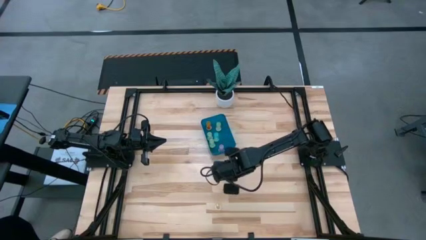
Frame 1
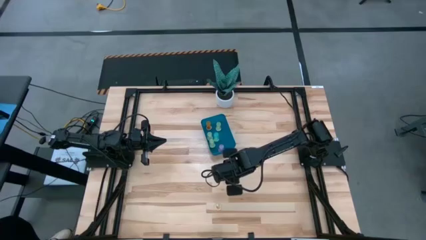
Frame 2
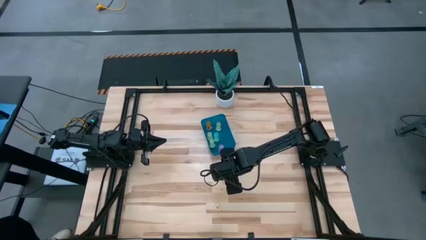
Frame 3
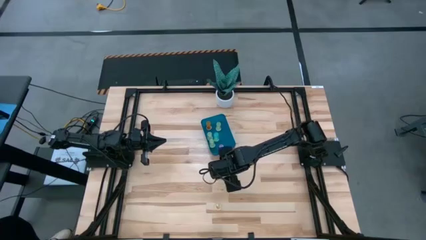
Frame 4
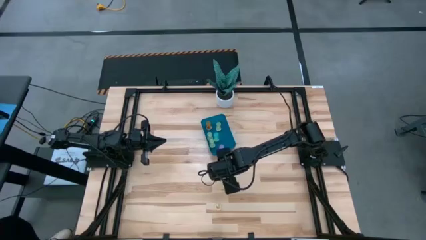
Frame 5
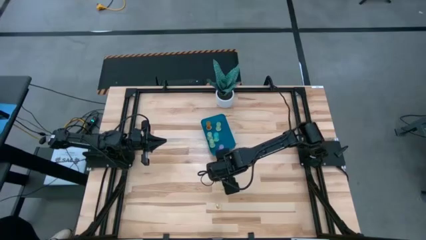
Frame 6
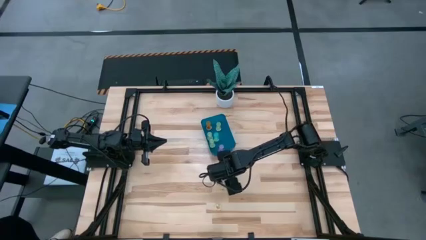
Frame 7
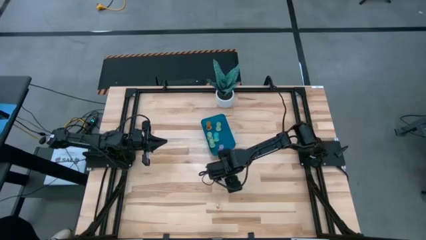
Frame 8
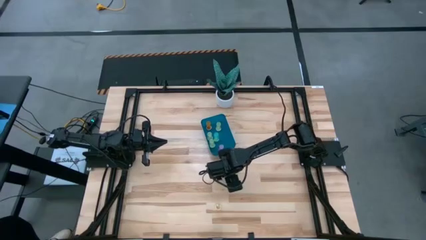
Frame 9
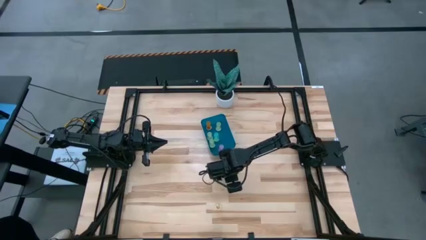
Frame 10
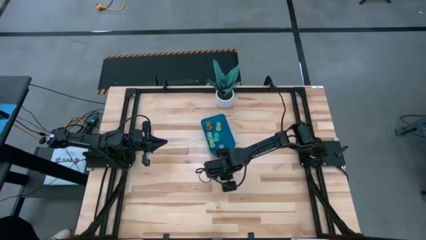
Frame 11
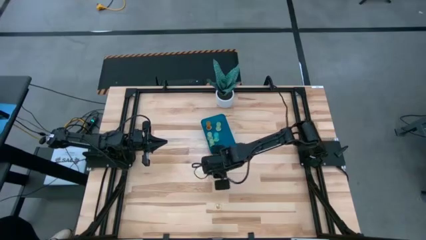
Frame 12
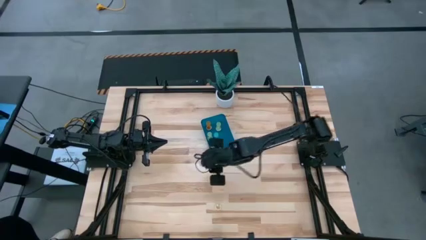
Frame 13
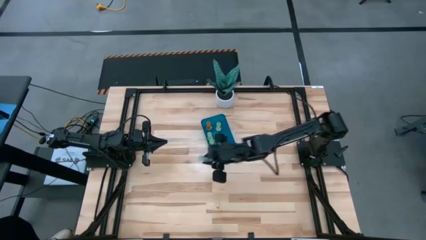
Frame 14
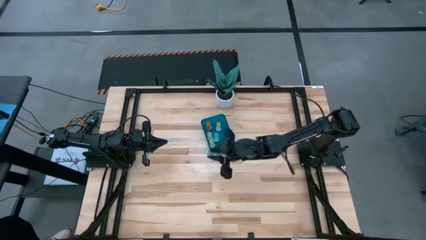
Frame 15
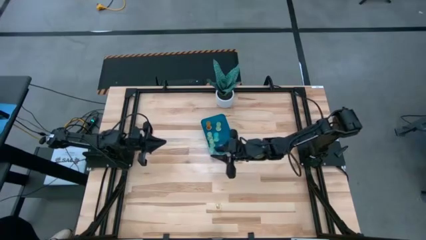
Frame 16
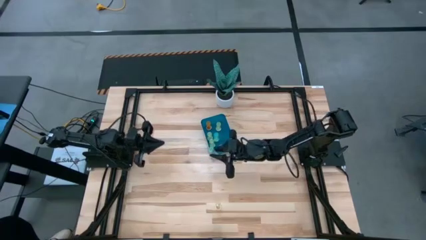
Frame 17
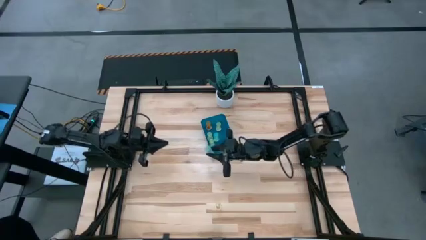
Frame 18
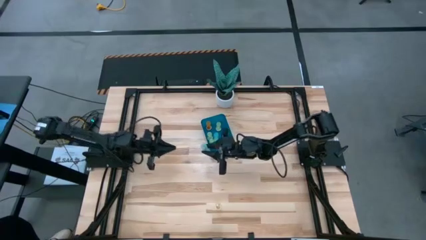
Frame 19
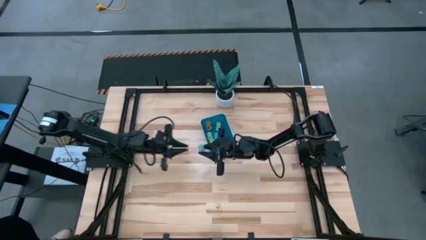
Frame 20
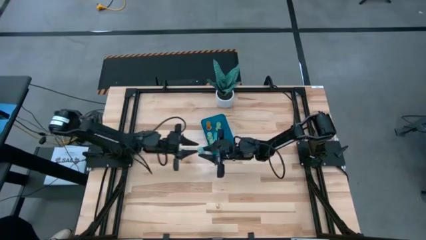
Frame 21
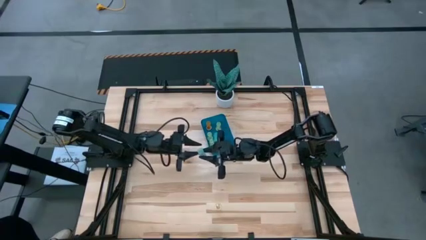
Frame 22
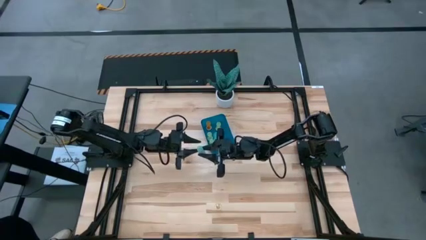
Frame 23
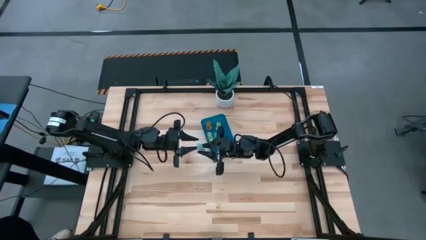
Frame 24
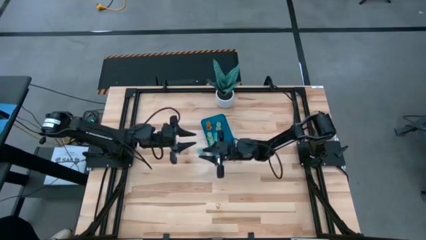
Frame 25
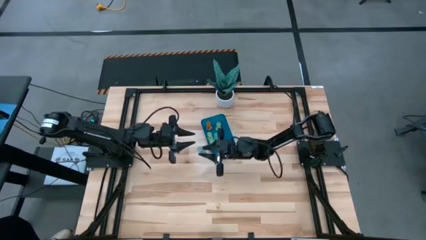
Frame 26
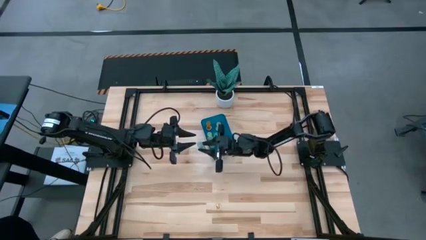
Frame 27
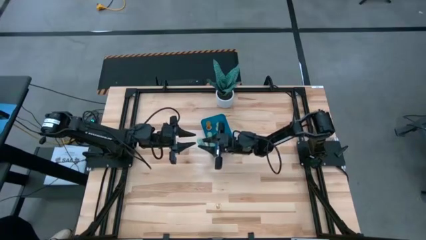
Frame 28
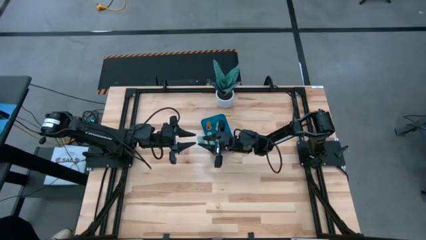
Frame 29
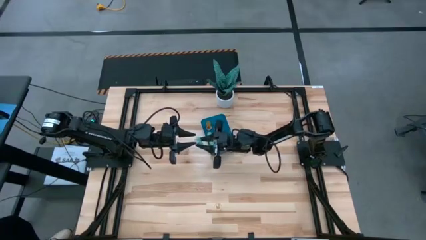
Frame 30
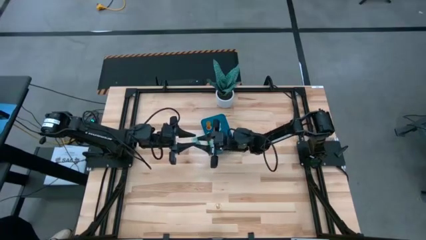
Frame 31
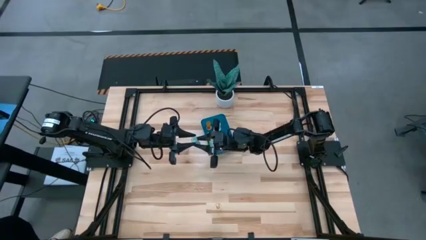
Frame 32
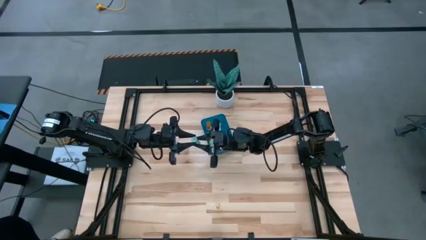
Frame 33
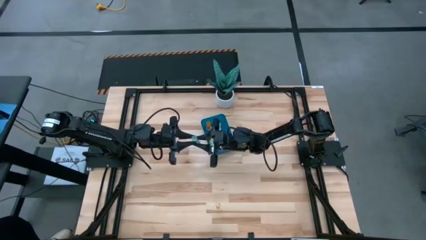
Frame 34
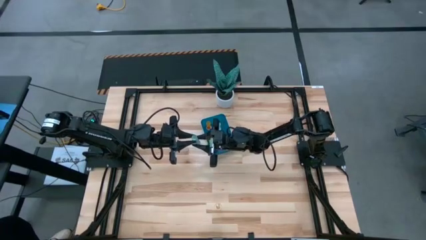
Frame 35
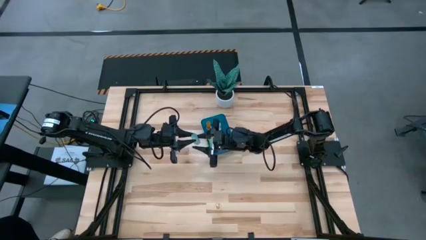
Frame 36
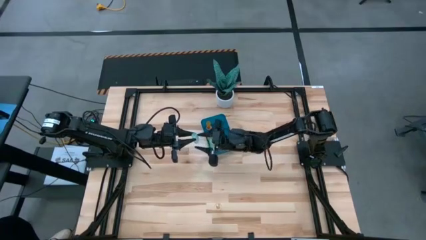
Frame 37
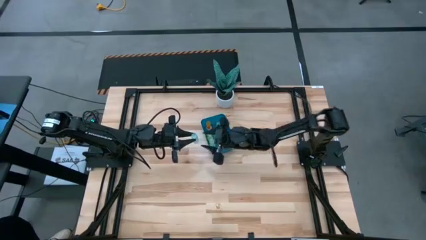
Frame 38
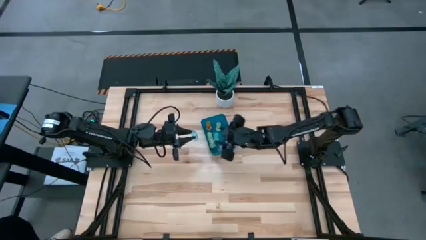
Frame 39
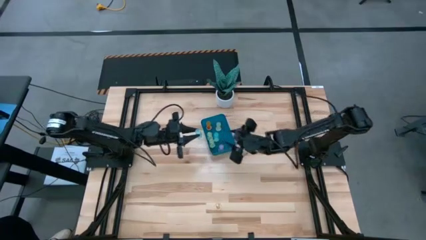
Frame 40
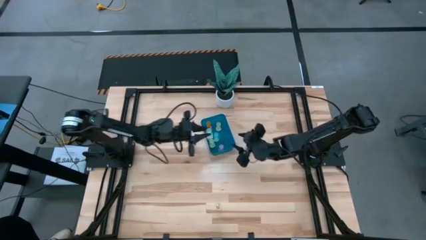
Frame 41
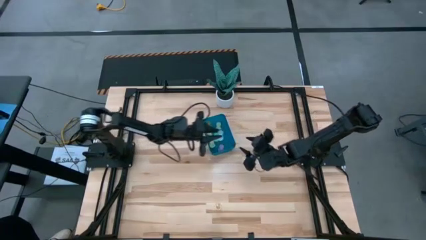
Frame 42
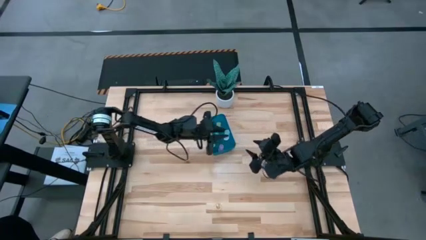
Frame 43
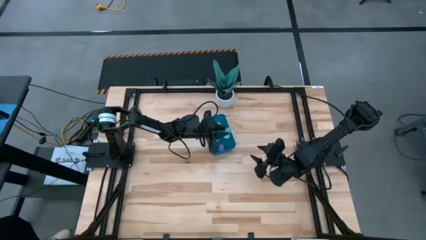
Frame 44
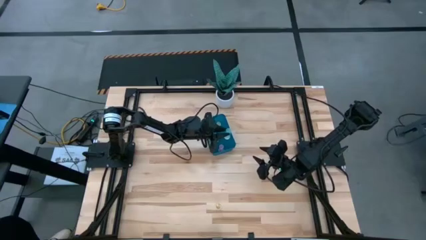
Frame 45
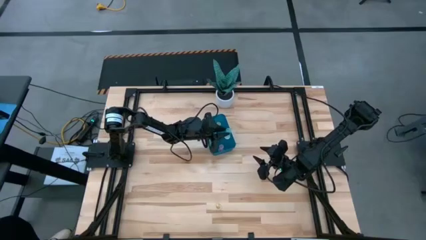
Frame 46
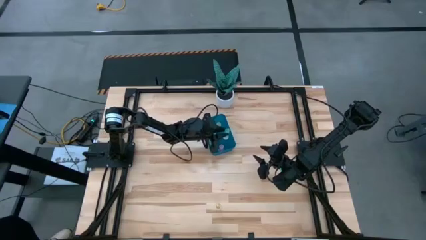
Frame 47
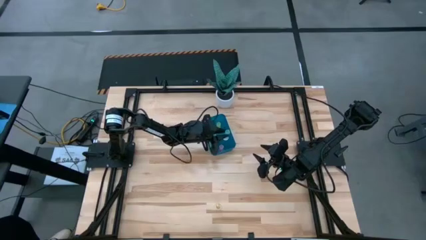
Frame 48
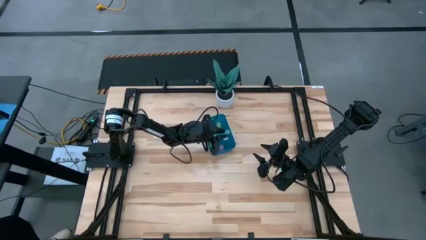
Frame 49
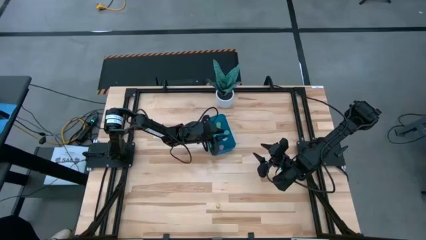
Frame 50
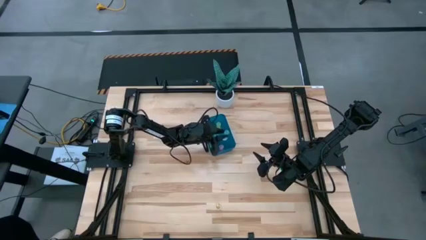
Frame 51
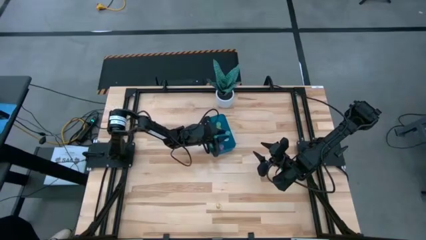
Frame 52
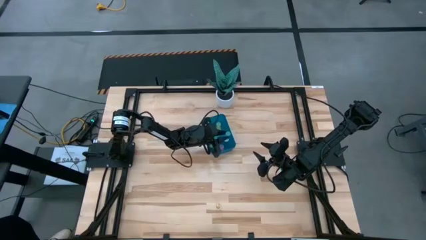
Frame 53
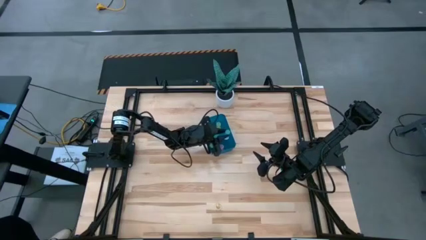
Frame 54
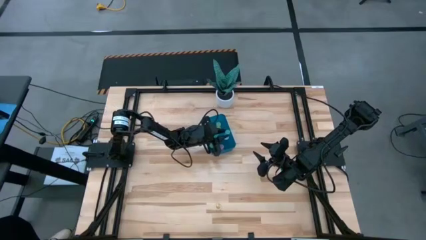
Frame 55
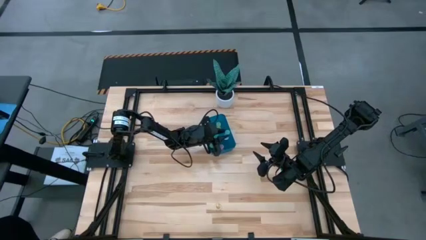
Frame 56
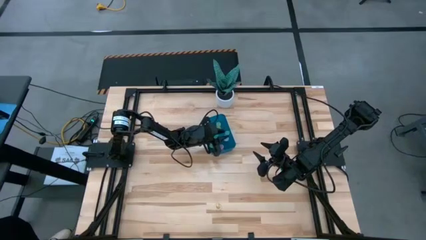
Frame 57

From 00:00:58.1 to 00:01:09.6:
Task: Pick and place pill bottles into a basket
Put the blue pill bottle into the blue bin

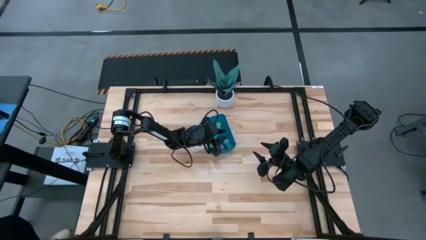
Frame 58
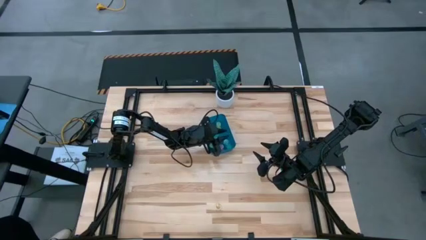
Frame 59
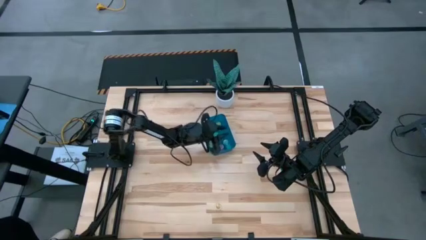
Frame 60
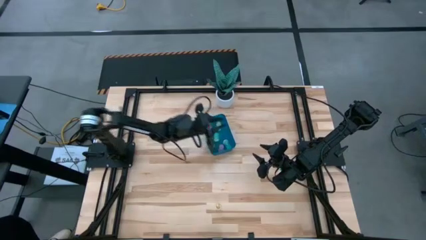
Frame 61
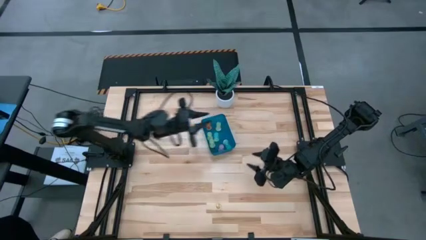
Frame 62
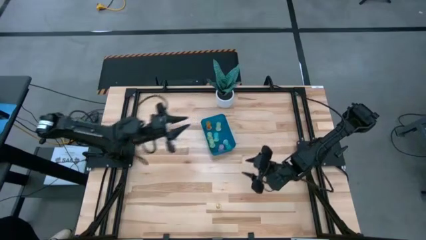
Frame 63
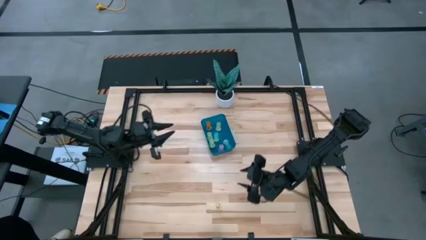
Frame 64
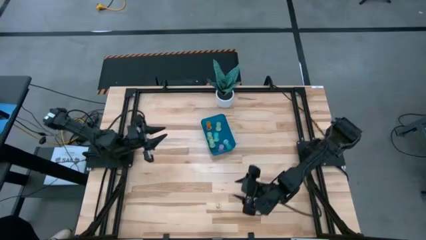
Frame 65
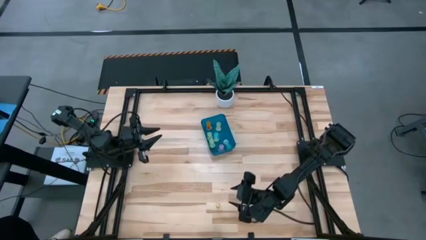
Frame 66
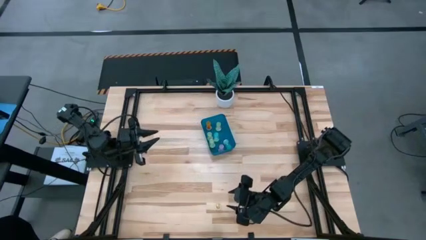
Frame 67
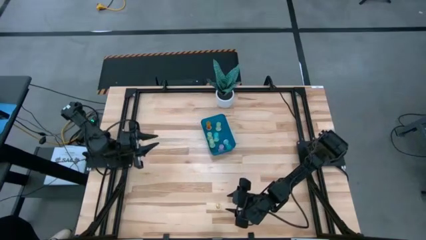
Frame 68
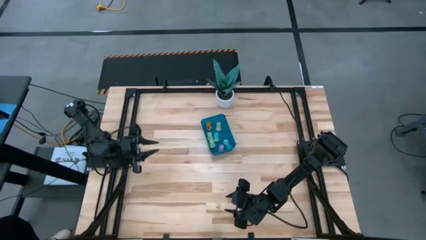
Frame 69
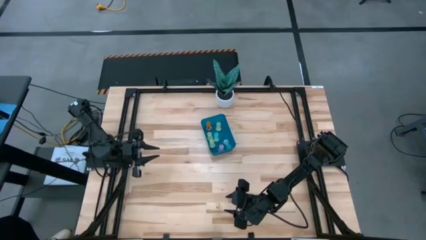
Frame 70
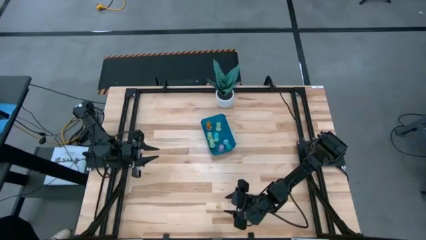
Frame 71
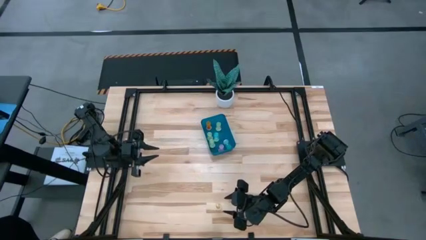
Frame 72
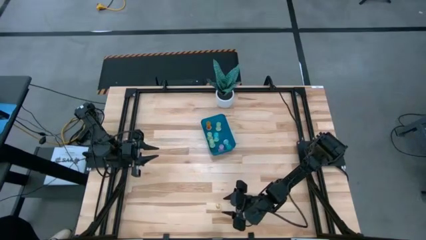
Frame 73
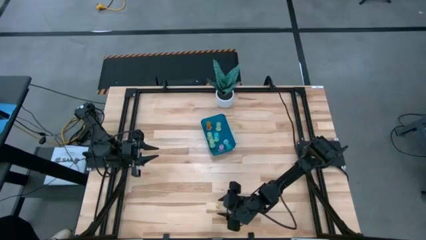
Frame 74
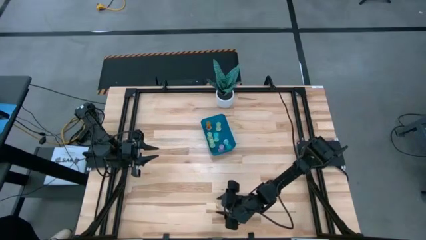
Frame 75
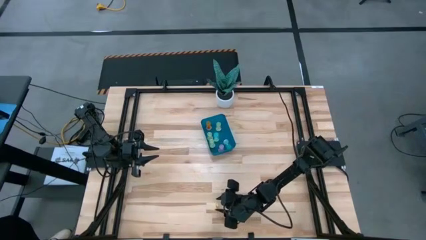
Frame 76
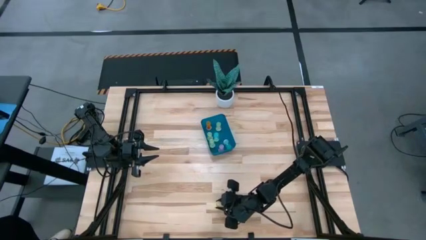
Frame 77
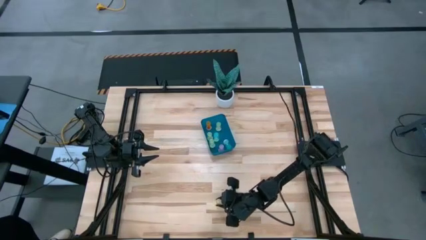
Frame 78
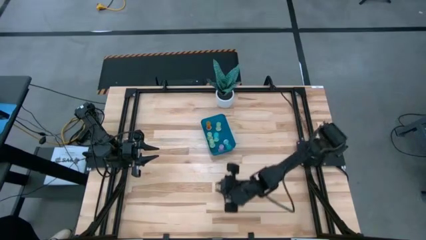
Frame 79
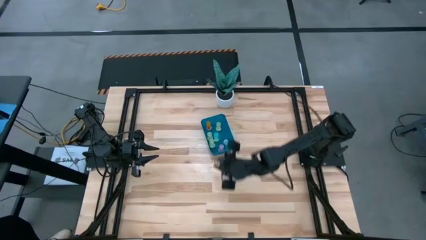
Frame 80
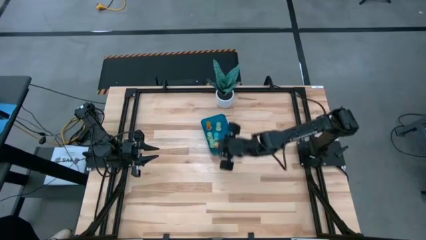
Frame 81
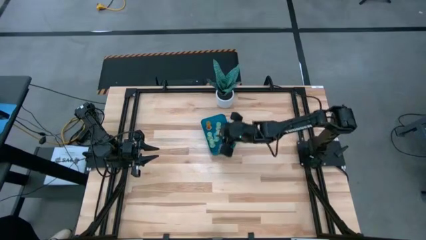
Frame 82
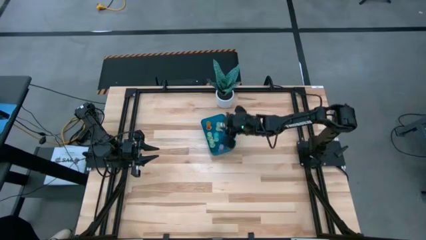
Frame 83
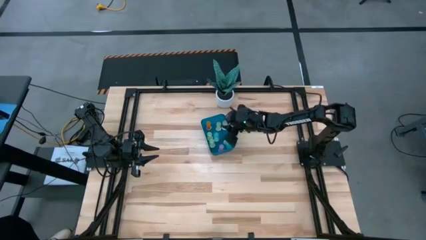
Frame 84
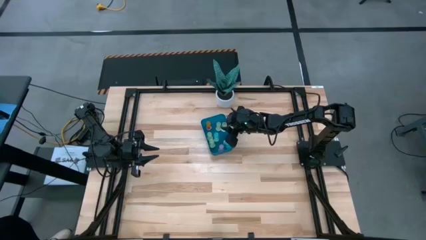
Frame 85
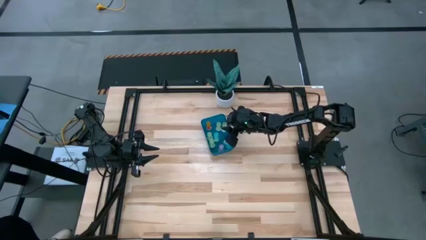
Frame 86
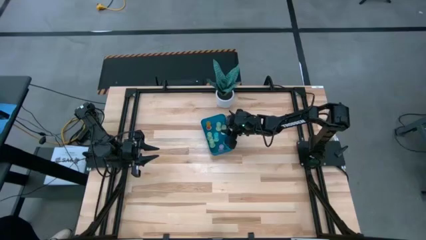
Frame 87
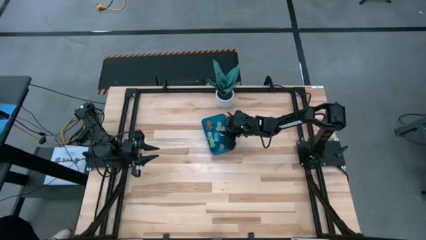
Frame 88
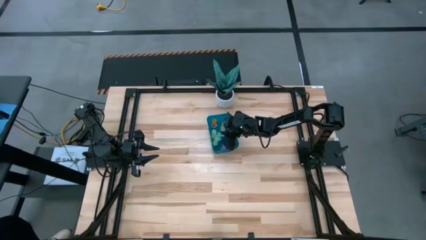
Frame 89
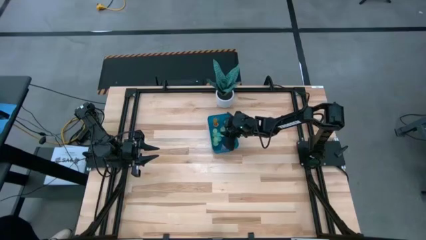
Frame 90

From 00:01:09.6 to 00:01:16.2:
Put the green pill bottle into the blue bin
